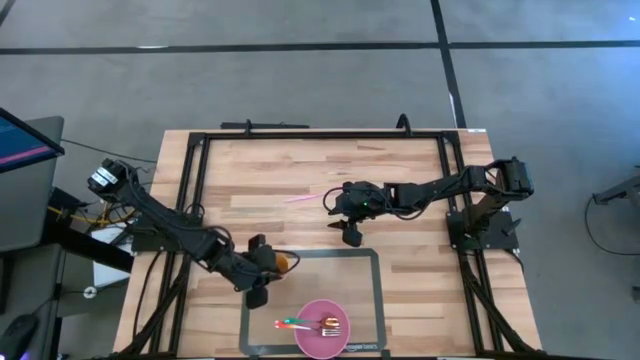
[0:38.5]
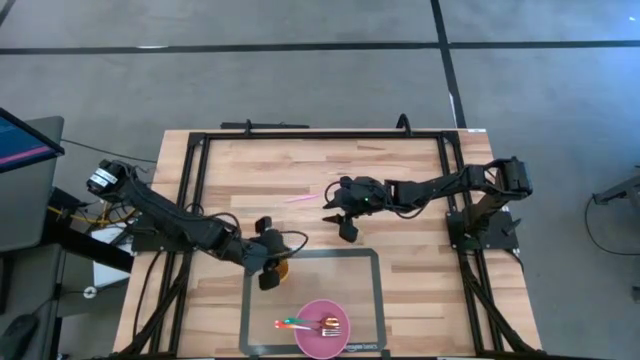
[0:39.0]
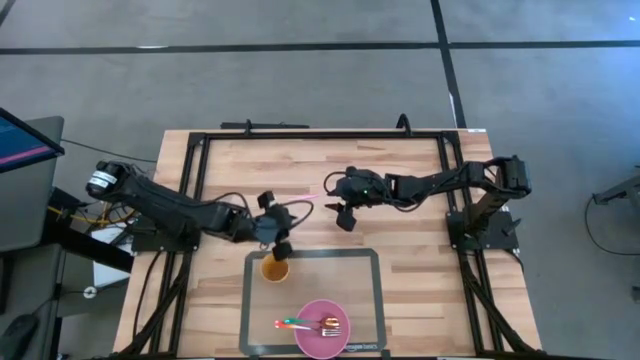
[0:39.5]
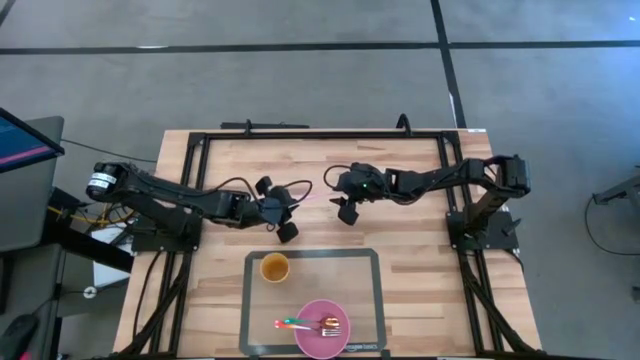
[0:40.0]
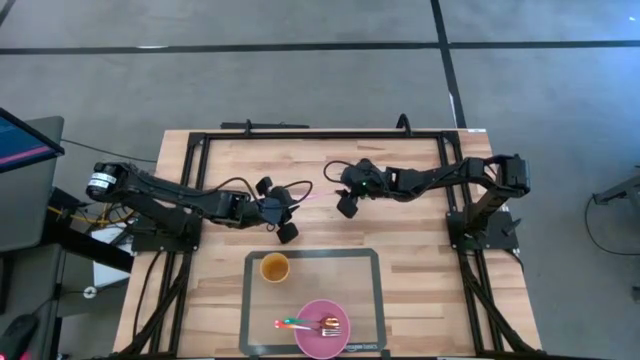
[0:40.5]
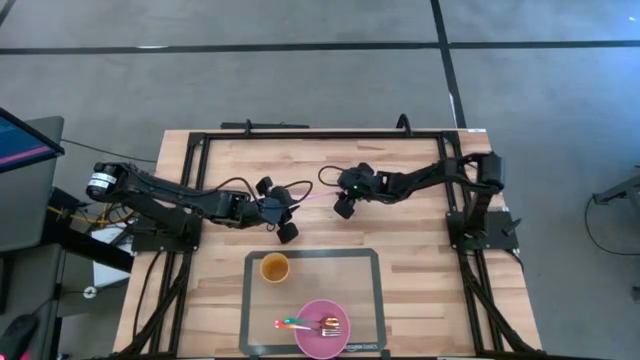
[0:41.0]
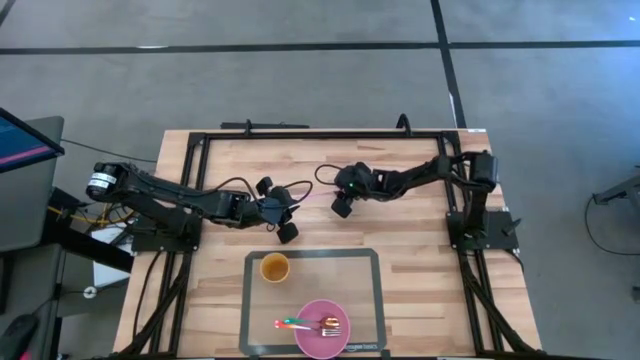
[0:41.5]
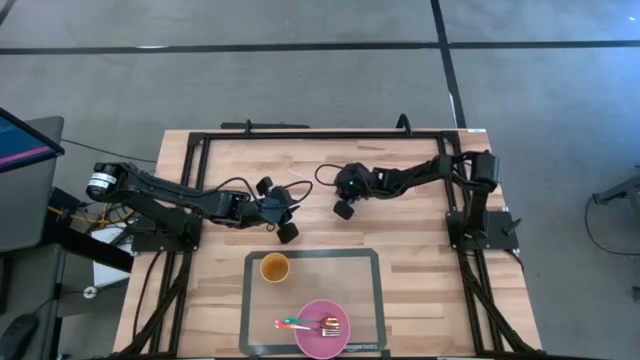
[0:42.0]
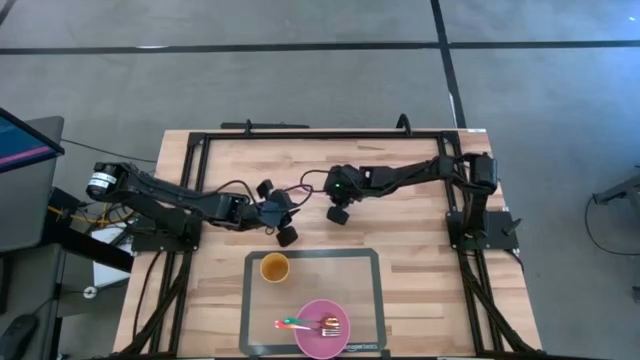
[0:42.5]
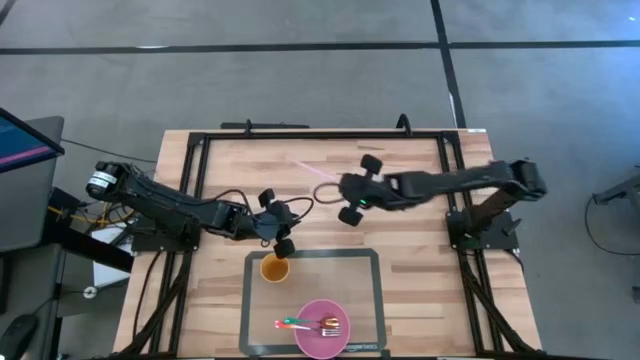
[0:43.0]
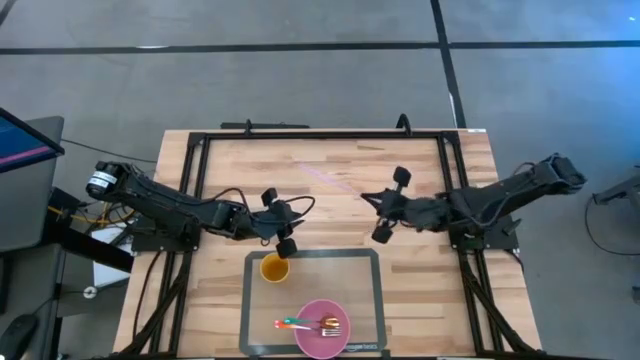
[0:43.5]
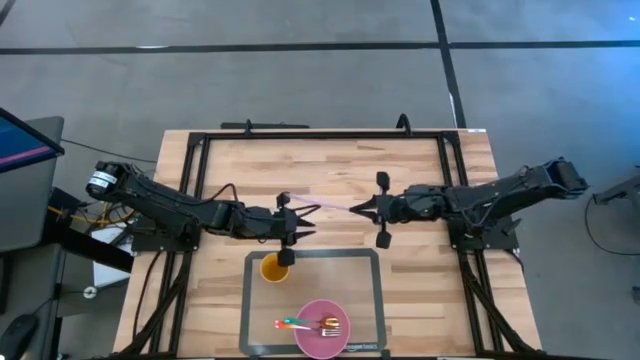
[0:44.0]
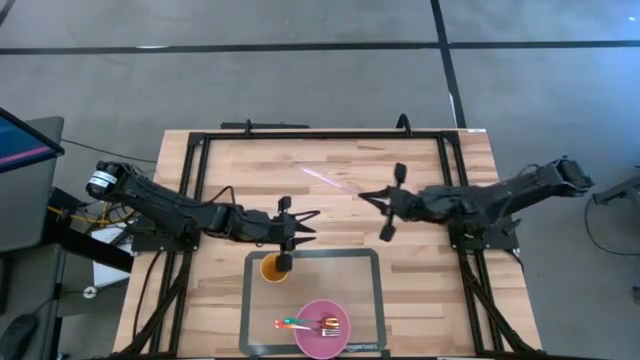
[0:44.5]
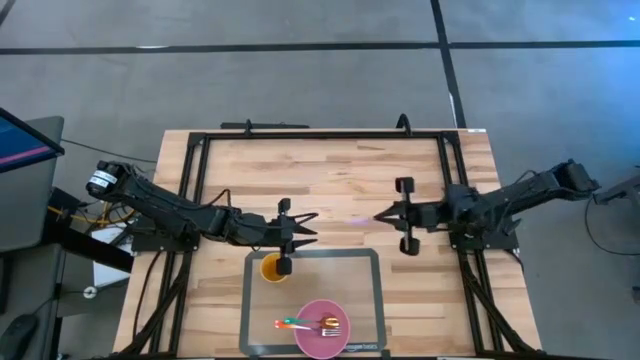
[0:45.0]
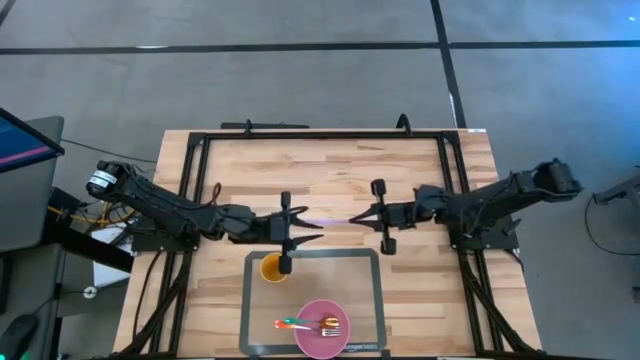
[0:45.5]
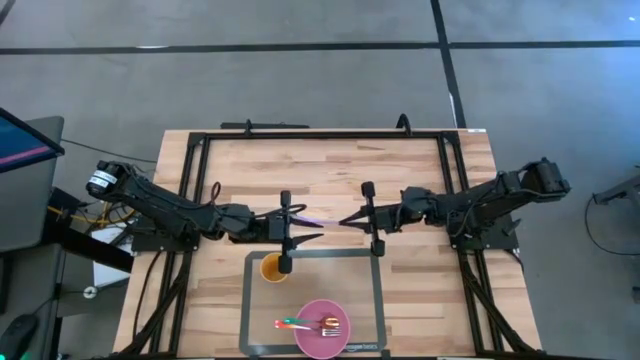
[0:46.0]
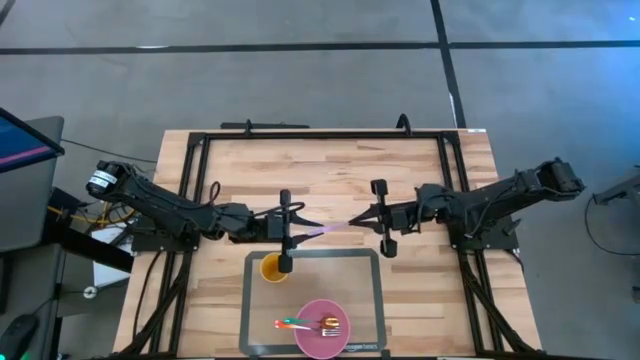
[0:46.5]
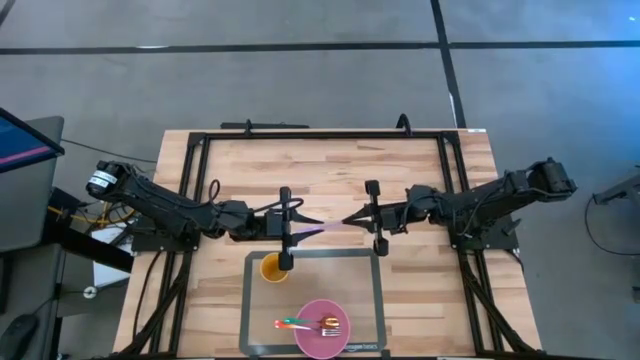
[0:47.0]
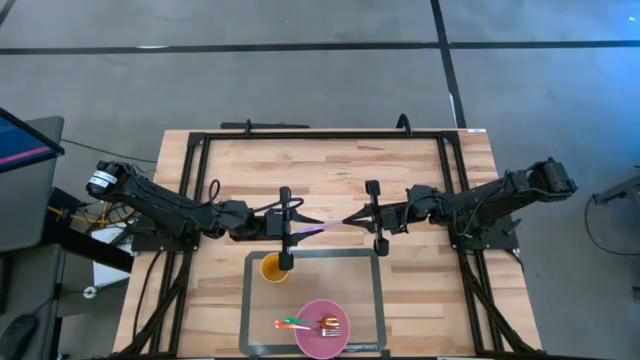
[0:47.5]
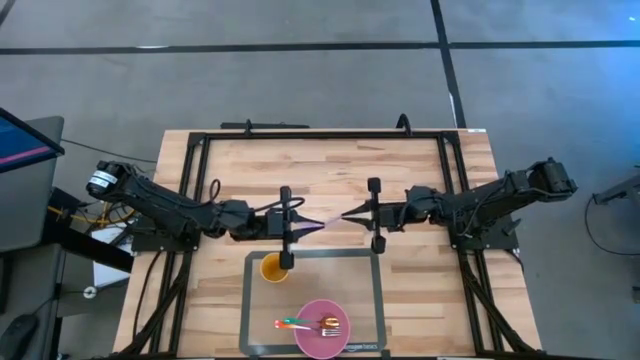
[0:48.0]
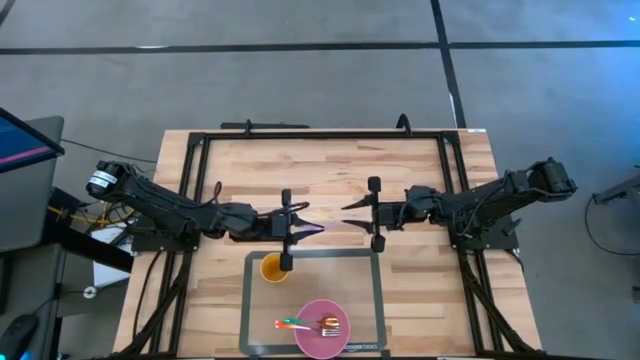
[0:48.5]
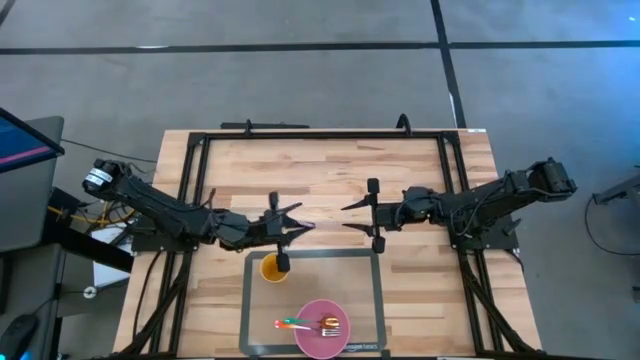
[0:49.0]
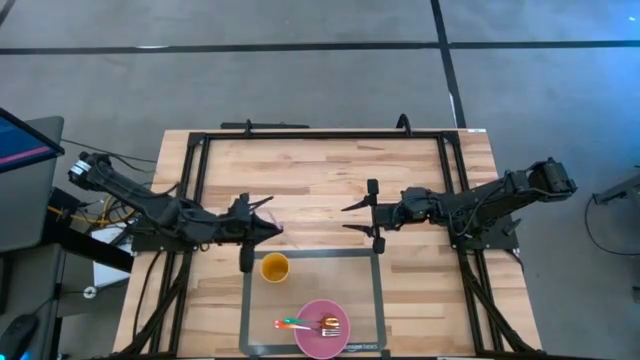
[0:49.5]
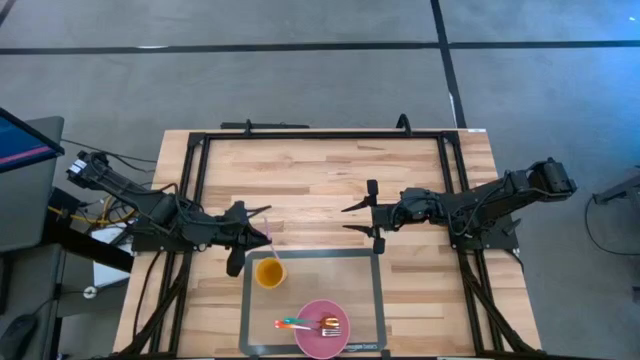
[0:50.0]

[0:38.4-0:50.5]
Task: Pick & Place Utensil
Put the pink straw into the yellow cup on the transparent mat

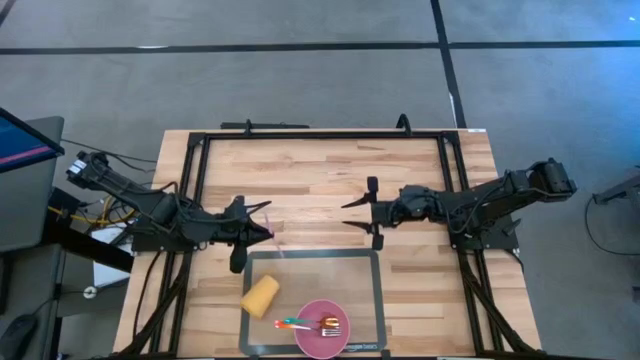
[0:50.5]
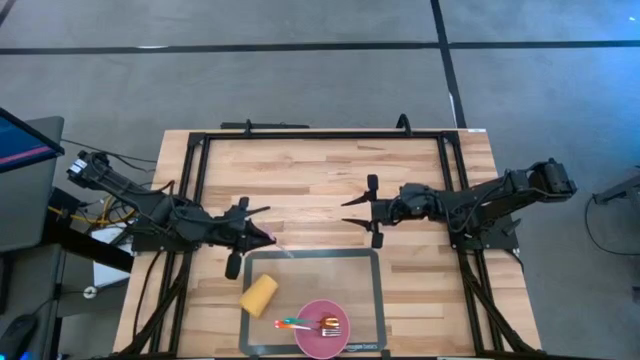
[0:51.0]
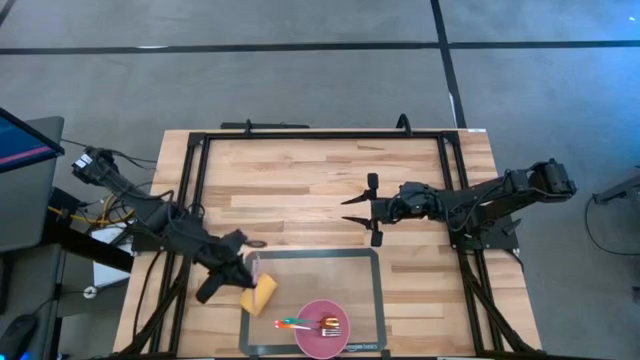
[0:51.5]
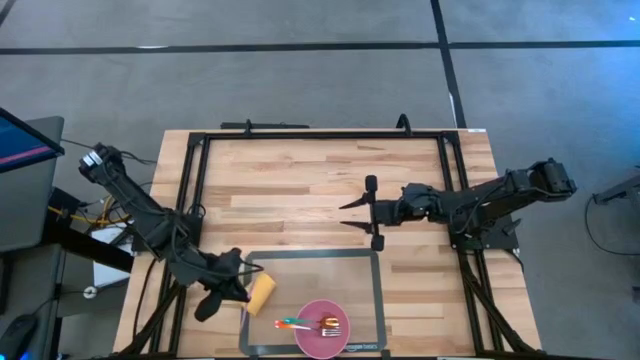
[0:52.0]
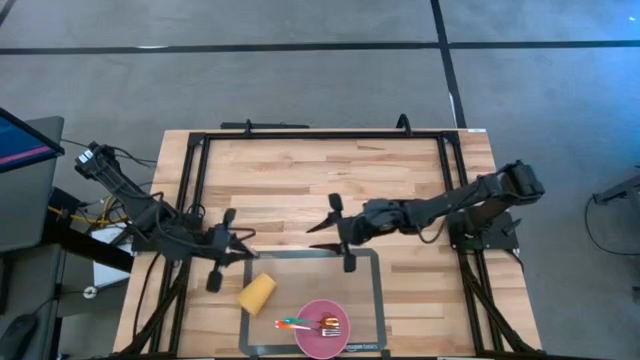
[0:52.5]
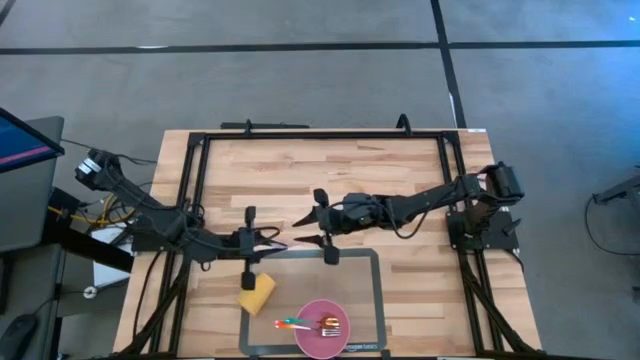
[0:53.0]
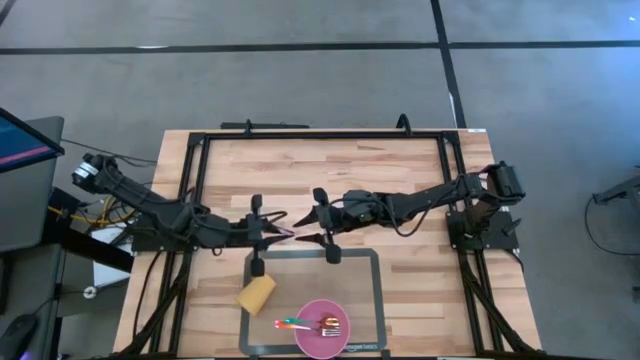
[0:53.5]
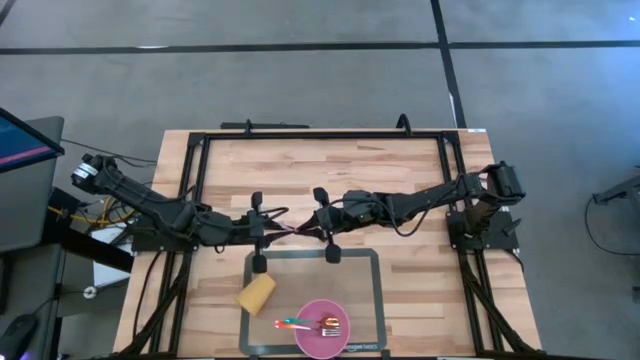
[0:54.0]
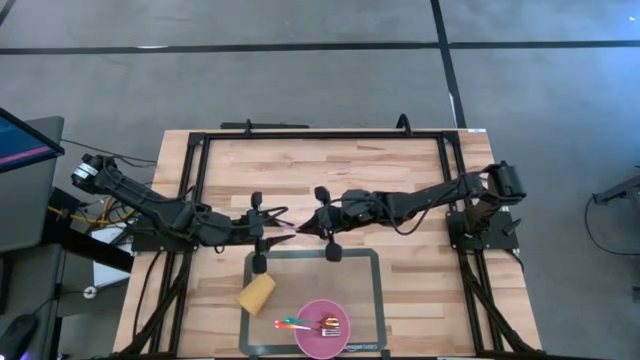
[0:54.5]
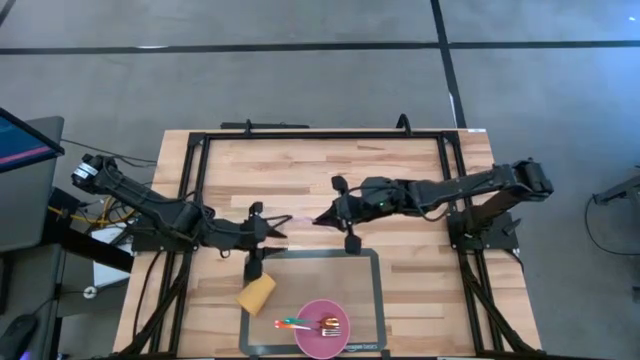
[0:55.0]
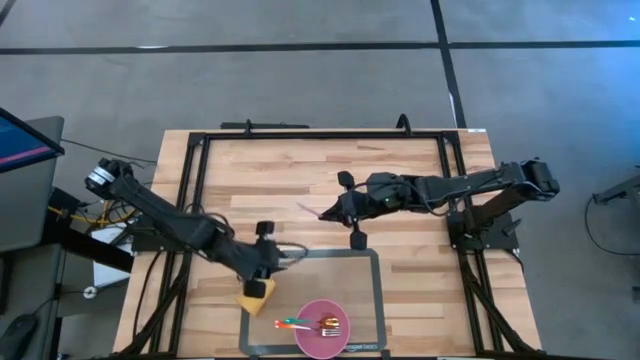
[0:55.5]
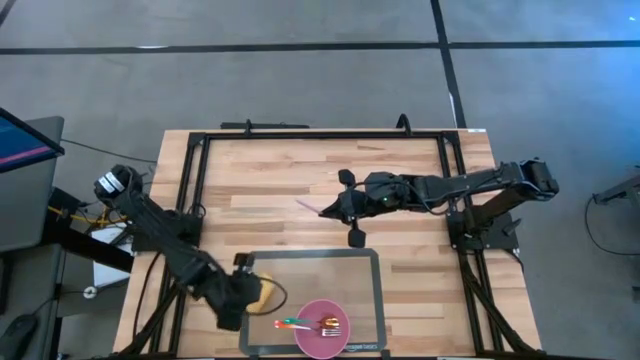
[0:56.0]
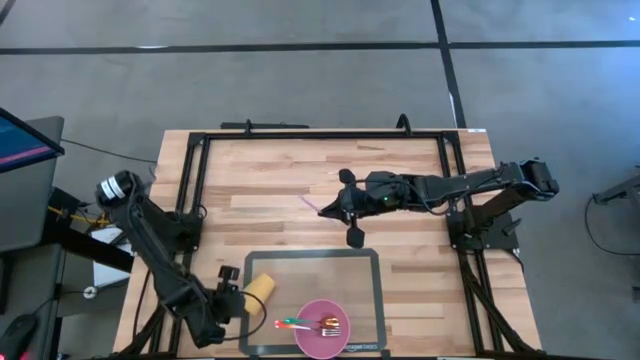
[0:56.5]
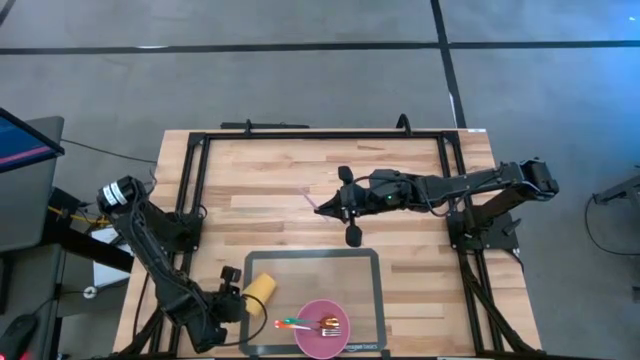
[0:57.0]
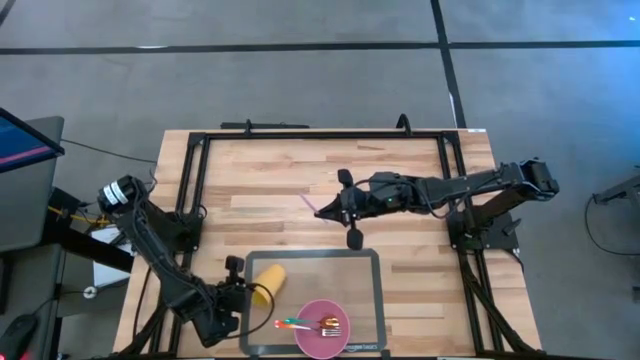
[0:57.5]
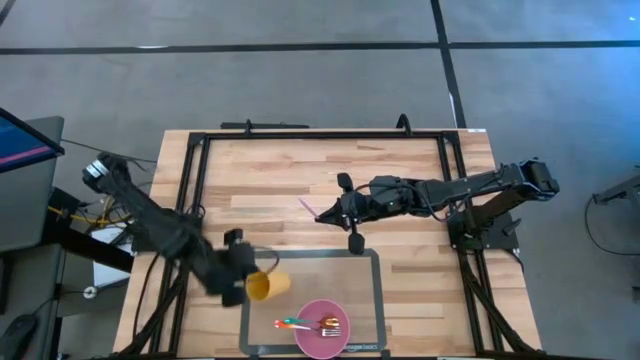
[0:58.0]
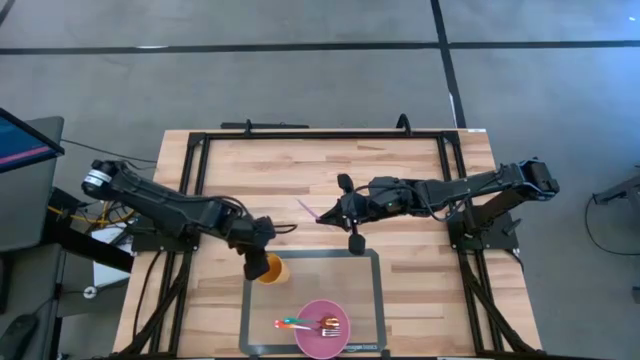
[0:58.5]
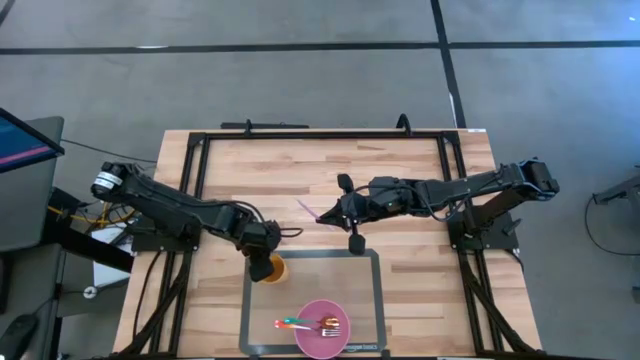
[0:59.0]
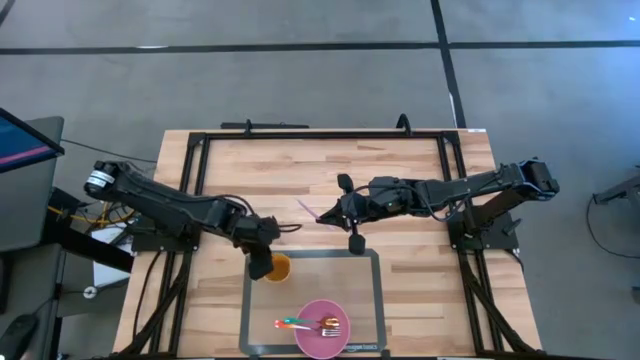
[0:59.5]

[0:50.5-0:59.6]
Adjust the yellow cup on the transparent mat
